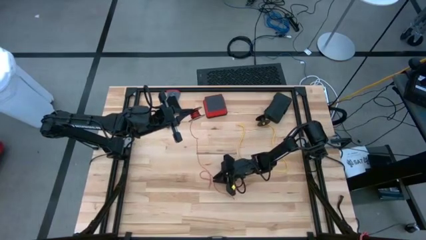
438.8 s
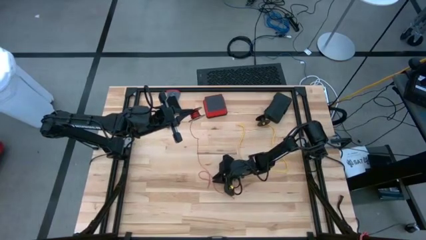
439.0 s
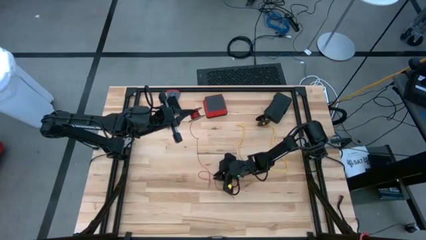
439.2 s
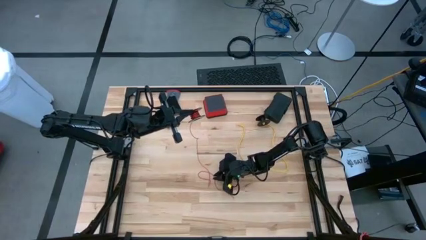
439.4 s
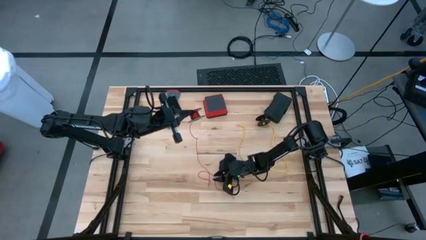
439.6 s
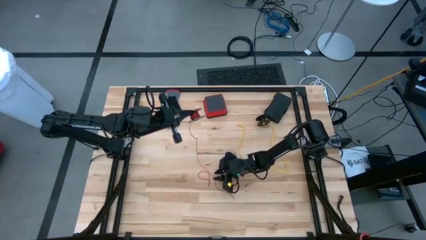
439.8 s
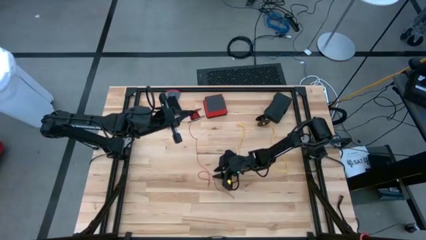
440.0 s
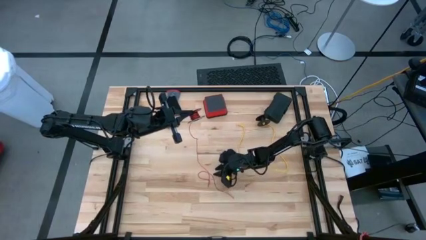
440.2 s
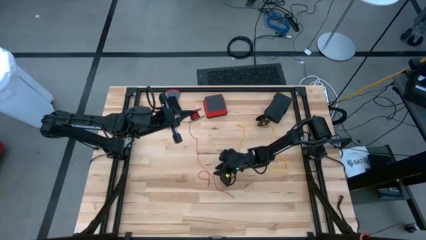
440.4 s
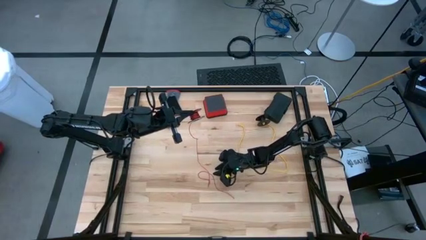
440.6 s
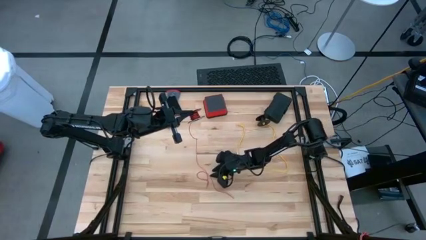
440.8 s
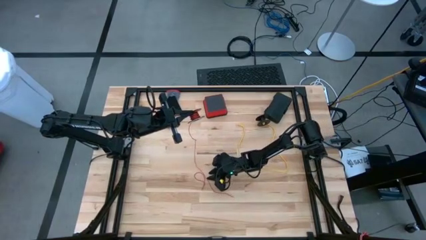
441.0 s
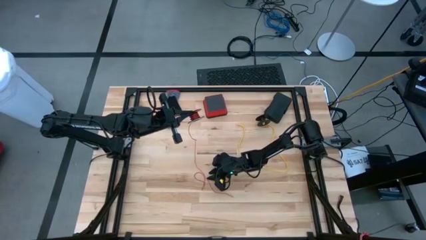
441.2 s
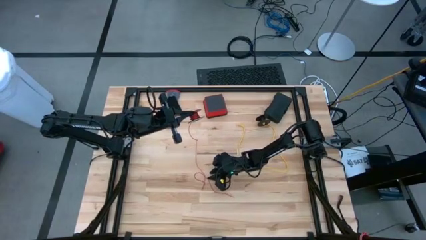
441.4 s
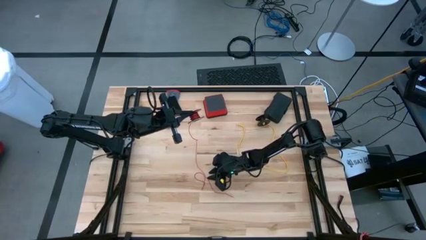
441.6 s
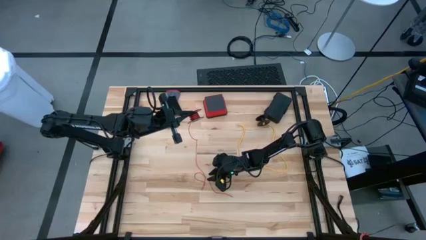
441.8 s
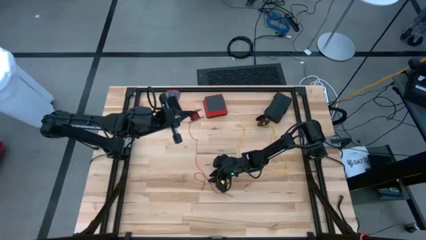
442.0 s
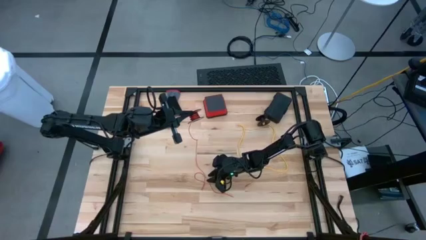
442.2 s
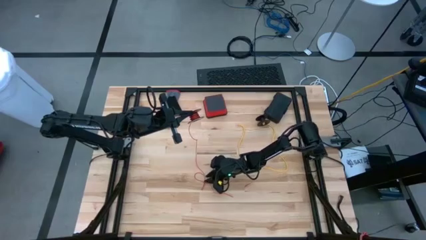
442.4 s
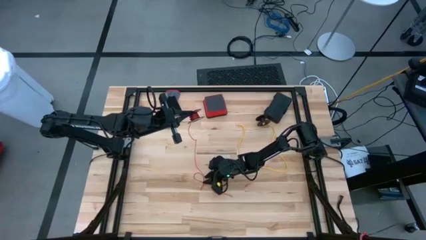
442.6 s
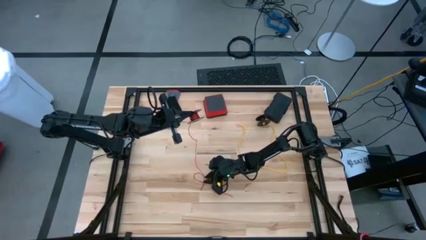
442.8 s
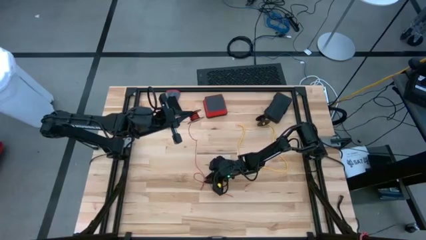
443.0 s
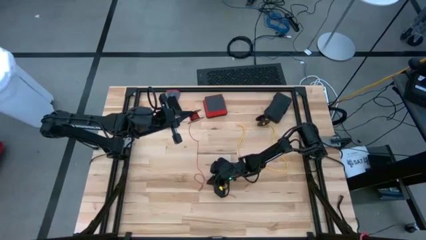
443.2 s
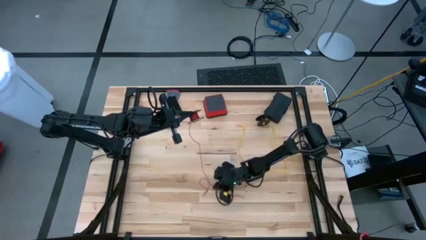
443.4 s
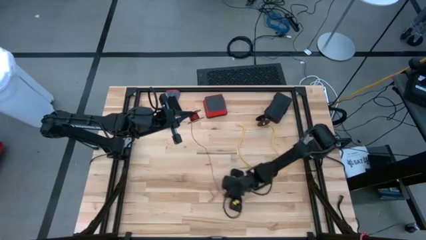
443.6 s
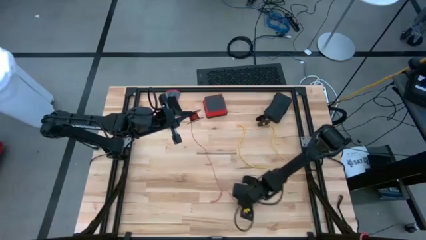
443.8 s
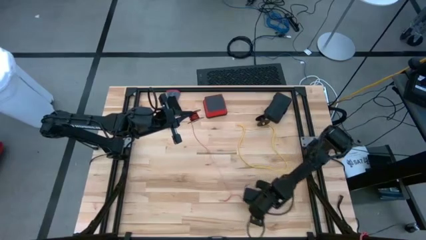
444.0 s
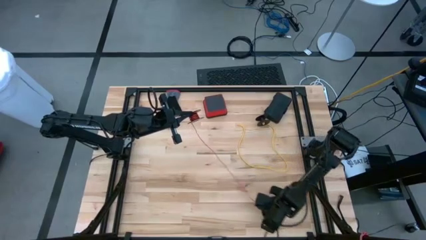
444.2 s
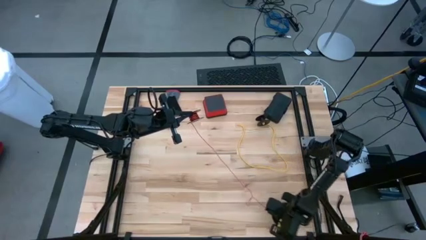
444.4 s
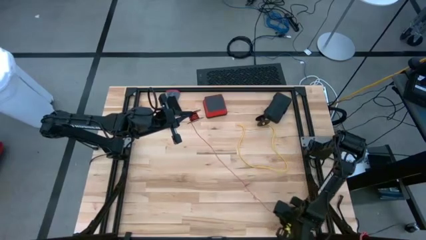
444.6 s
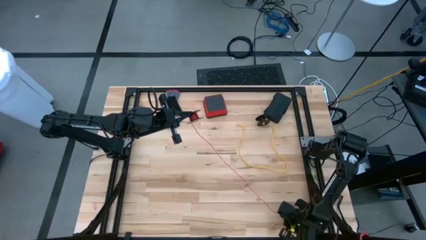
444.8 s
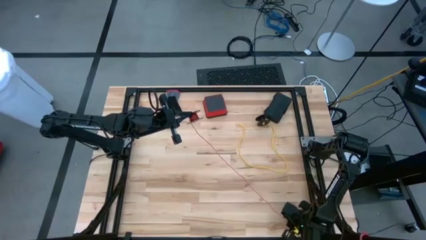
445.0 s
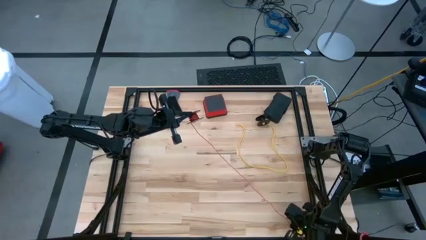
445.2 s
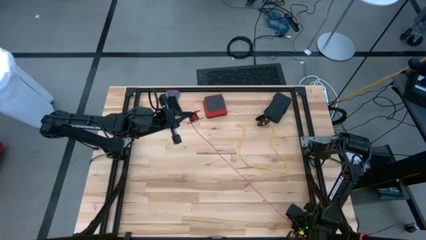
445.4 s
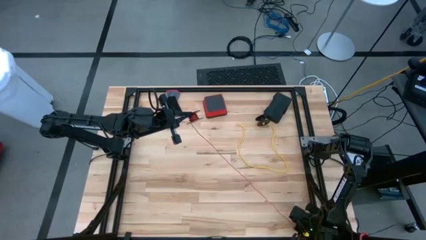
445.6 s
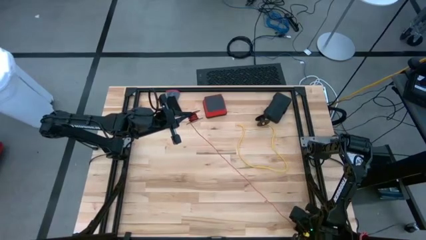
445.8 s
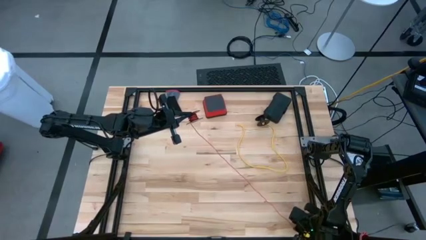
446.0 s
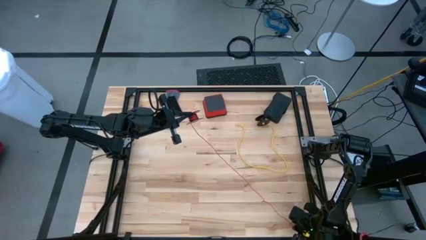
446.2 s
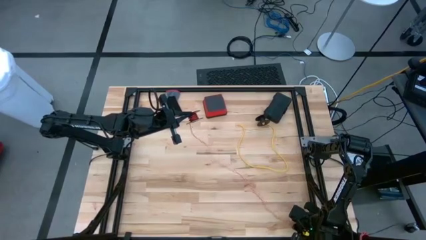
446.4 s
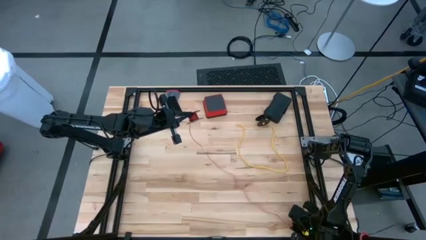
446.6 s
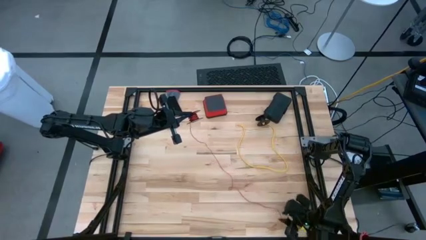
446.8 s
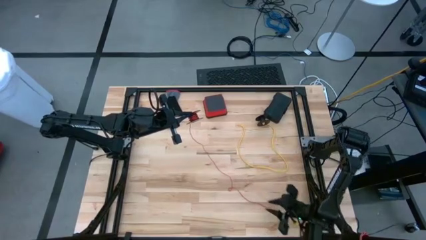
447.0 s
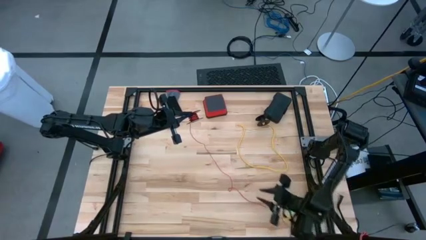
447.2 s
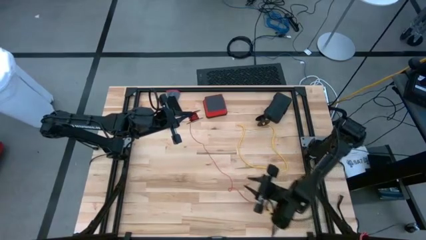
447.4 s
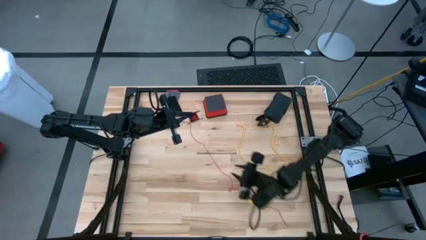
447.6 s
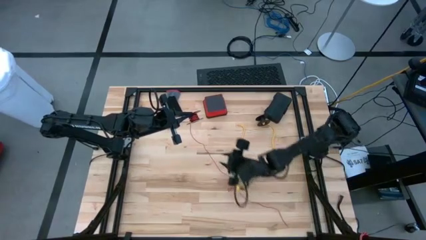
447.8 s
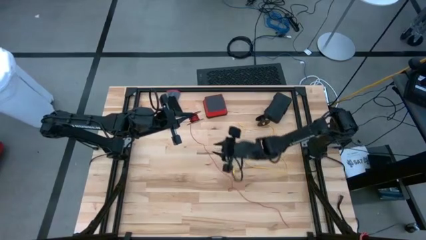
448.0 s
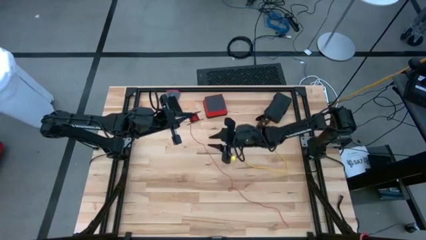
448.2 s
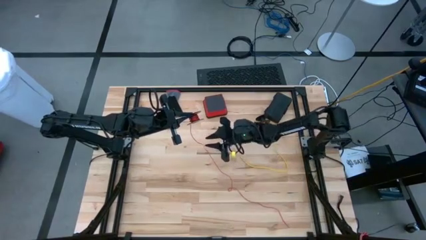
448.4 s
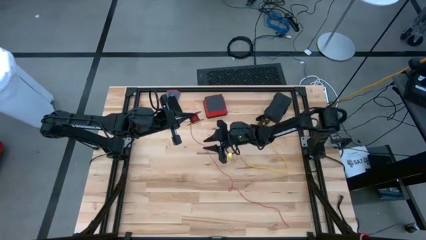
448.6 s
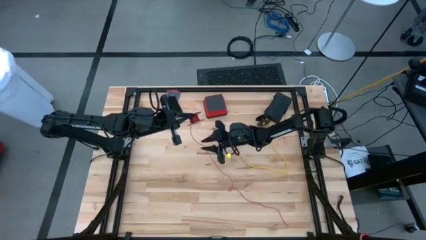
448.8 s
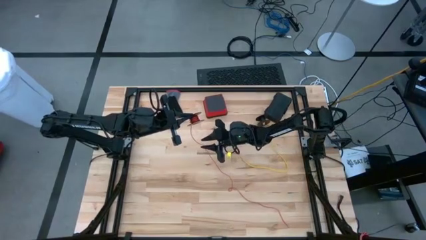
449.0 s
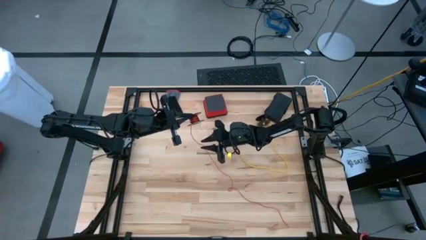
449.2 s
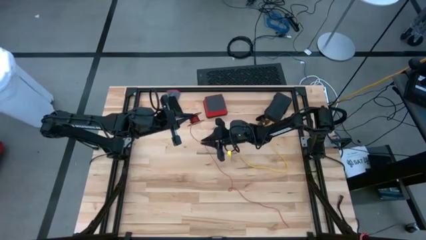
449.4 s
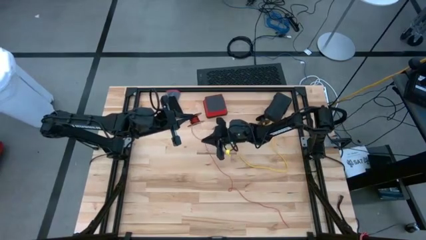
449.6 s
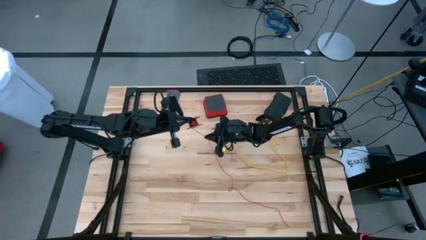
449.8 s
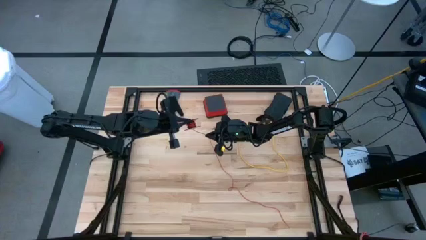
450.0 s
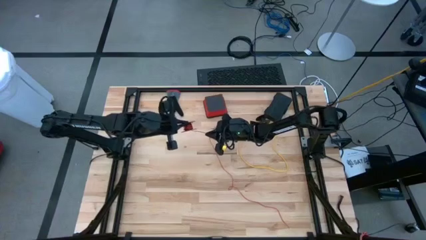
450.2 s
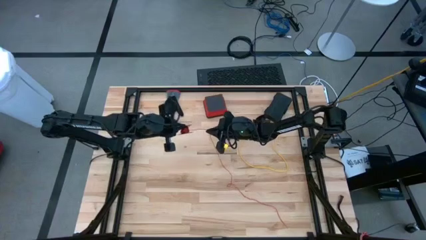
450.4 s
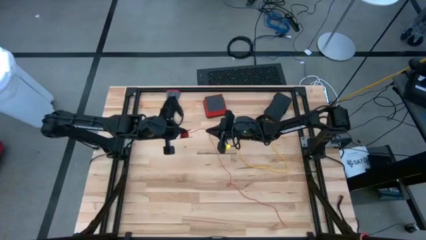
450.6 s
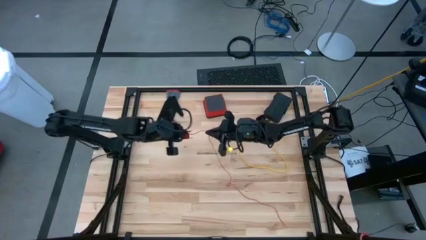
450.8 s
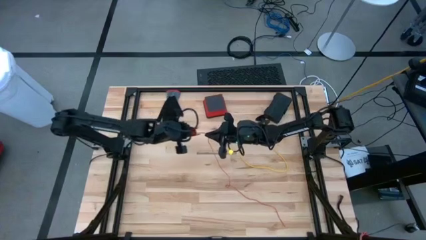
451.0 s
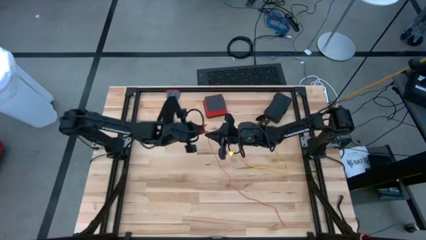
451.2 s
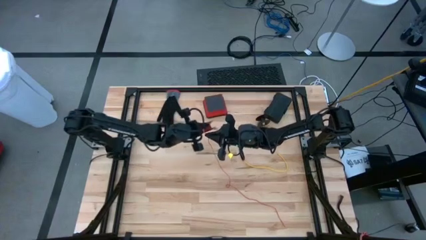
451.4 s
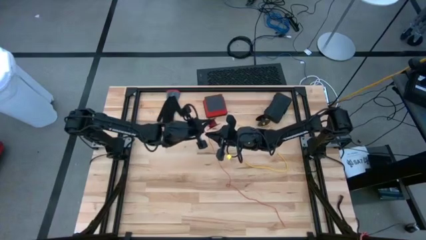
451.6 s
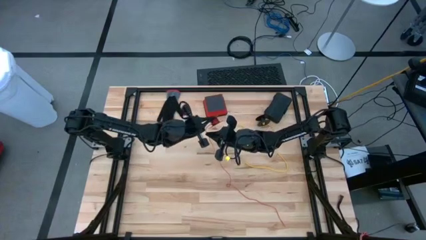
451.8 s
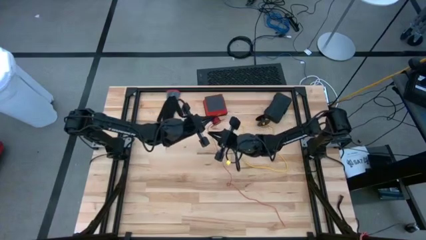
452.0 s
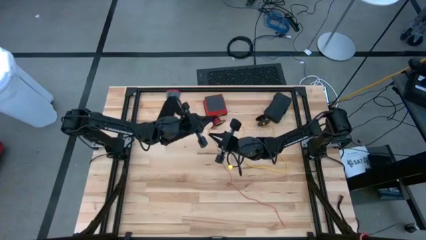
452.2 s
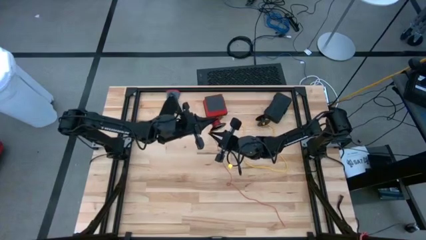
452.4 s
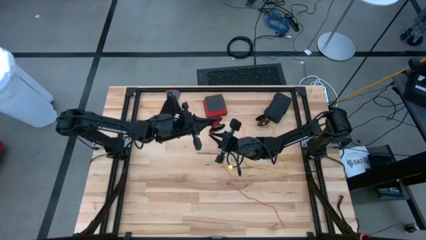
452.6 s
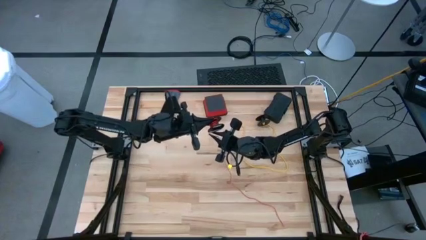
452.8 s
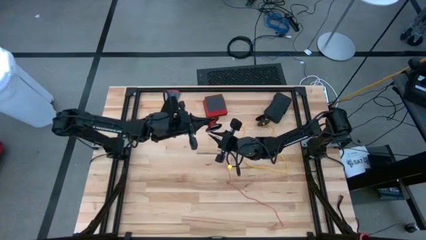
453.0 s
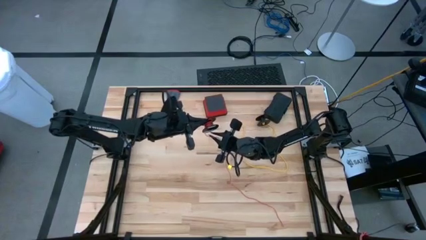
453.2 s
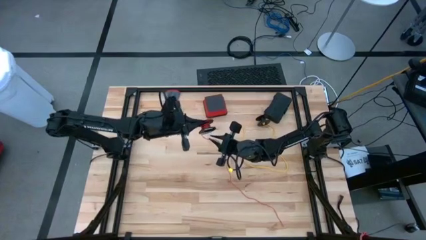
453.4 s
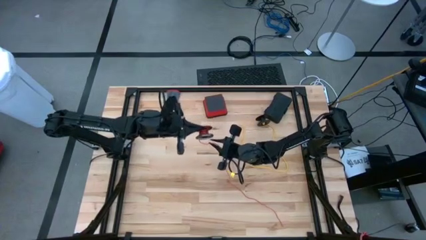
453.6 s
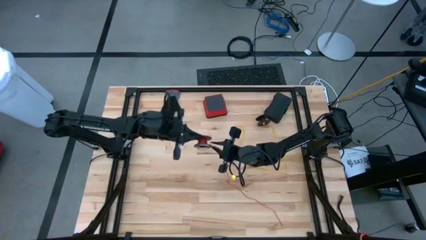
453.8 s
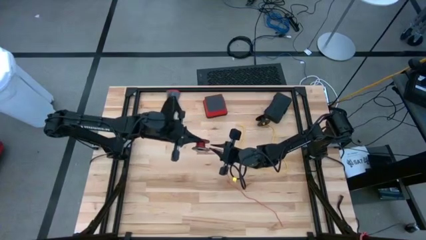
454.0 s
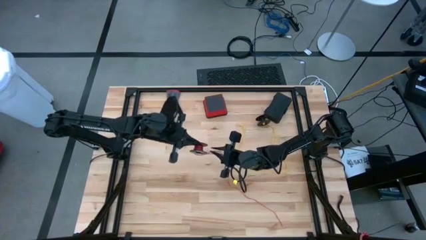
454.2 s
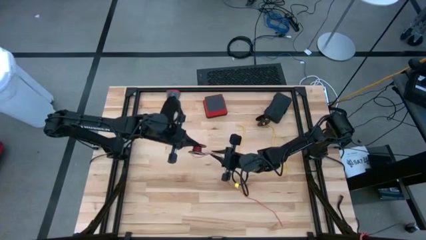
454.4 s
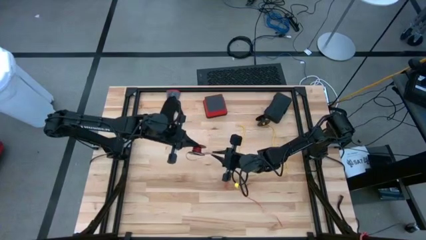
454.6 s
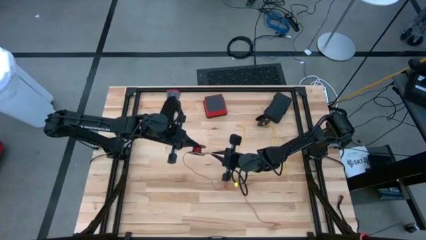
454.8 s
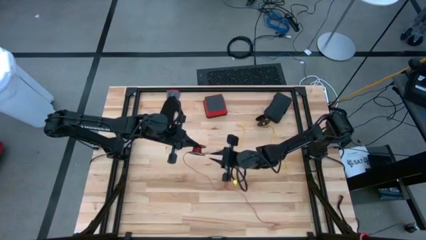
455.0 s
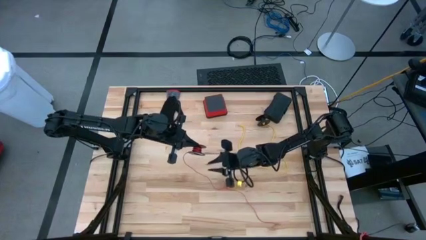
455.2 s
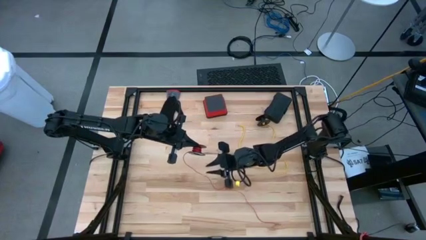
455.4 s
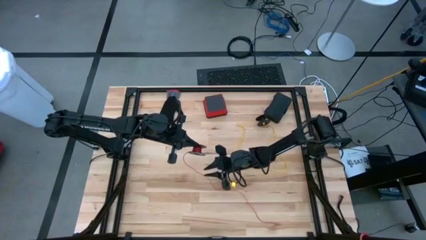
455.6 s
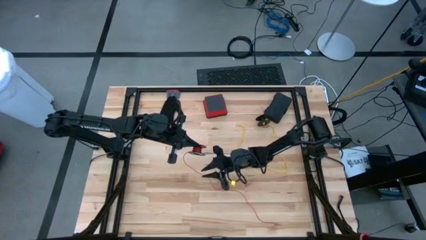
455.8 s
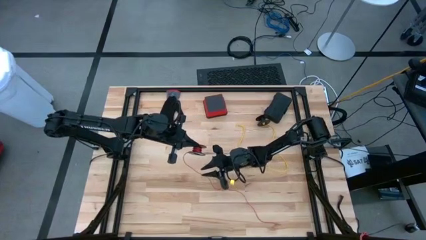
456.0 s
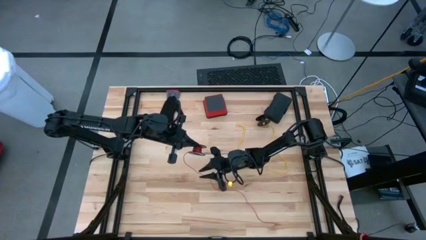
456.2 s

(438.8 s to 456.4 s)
Task: Coil cords
Coil the red wire onto the spool
